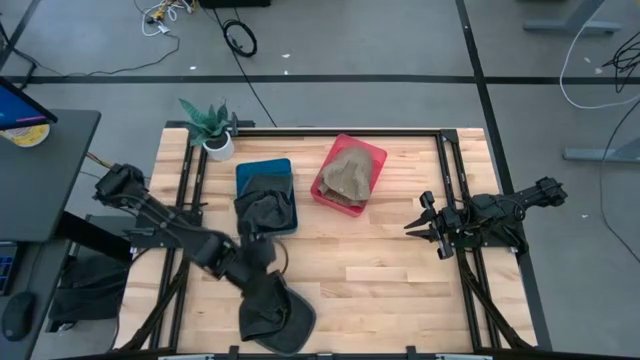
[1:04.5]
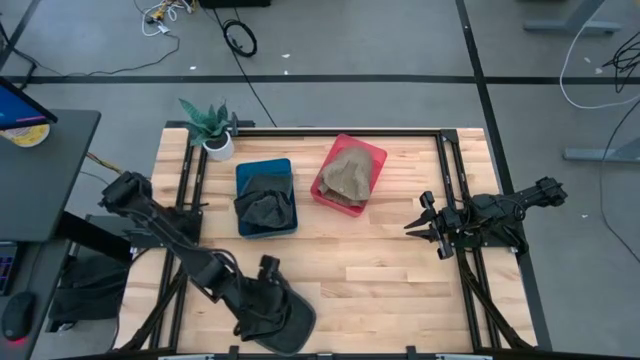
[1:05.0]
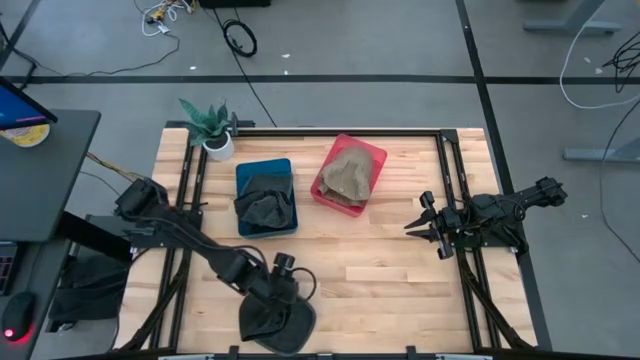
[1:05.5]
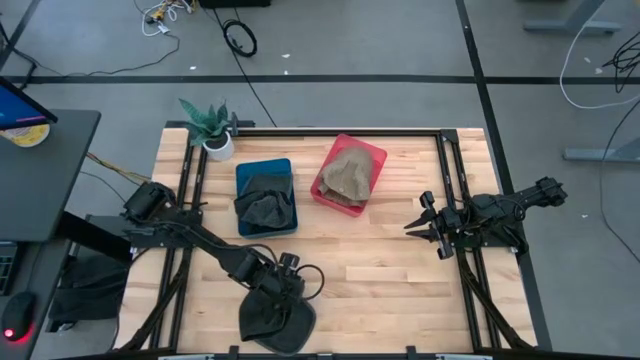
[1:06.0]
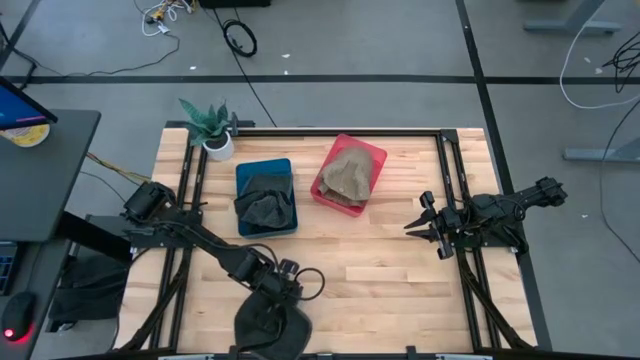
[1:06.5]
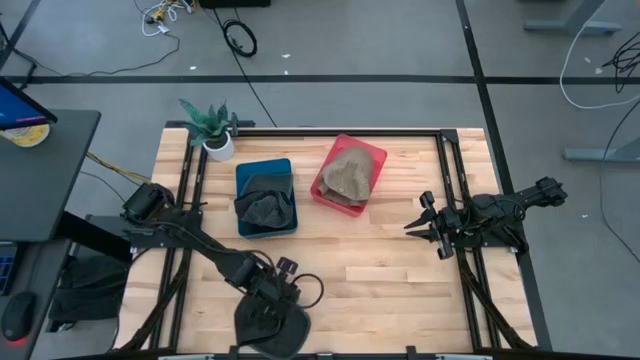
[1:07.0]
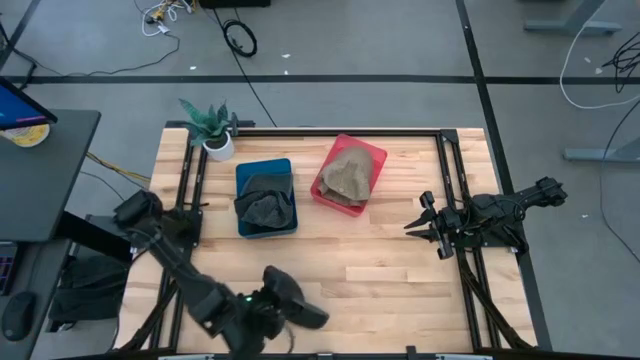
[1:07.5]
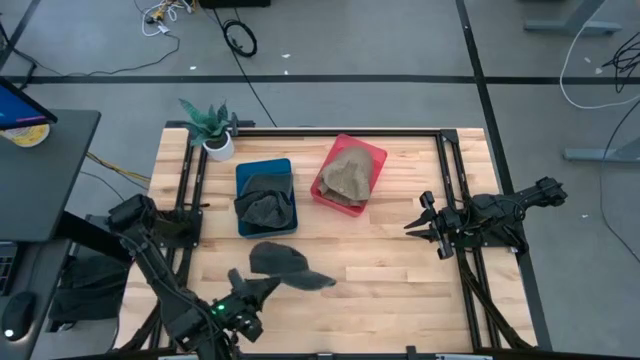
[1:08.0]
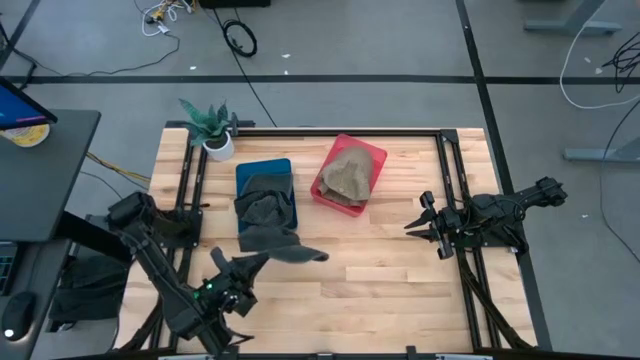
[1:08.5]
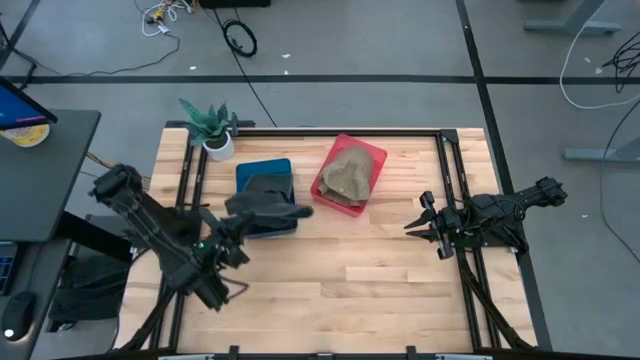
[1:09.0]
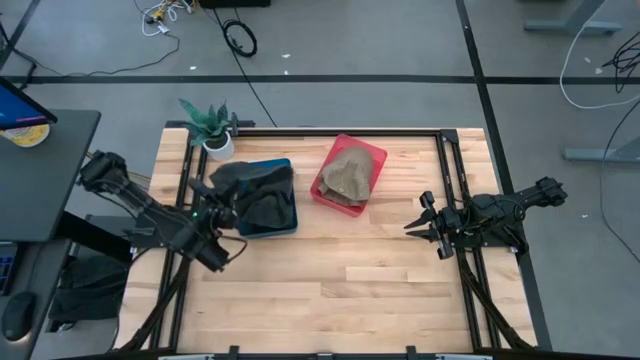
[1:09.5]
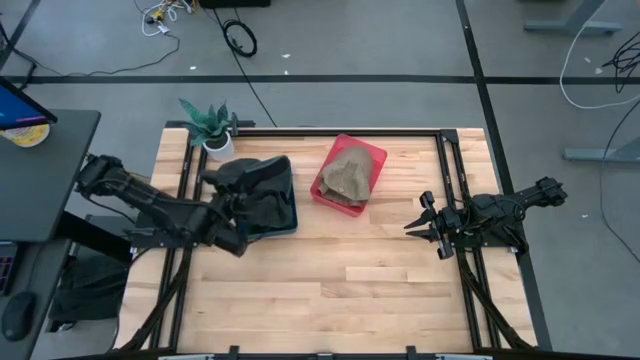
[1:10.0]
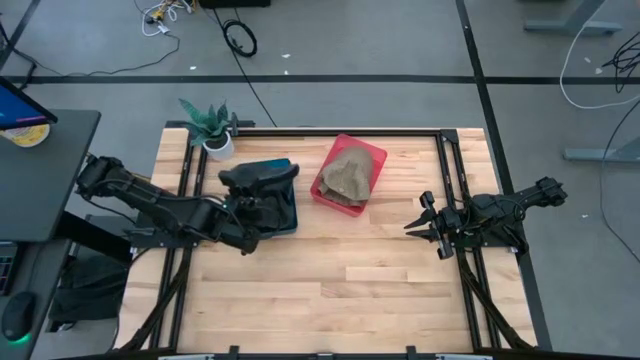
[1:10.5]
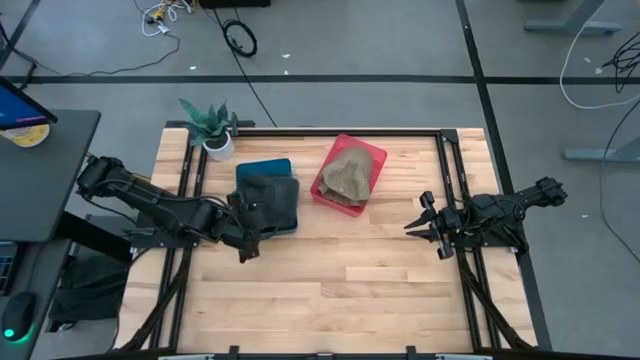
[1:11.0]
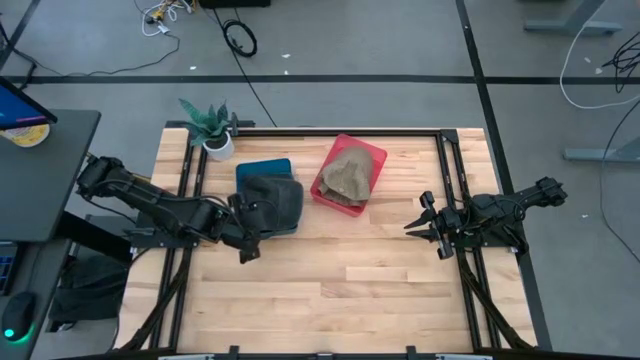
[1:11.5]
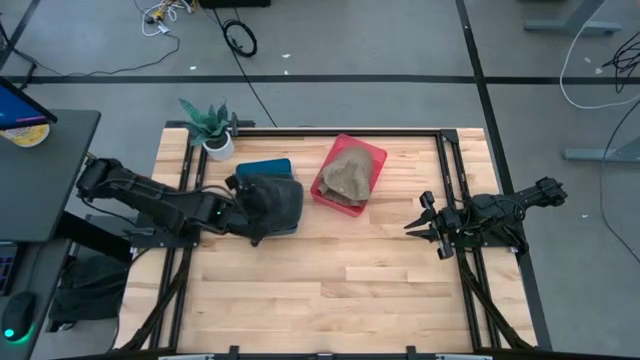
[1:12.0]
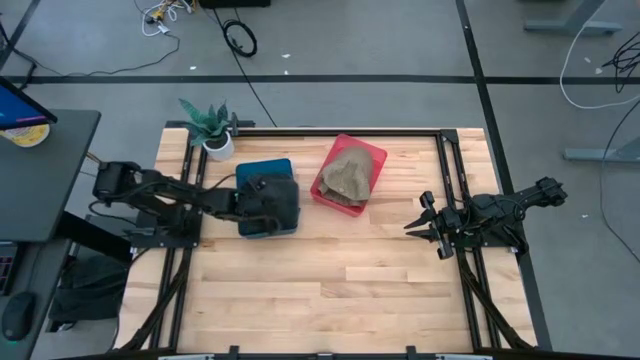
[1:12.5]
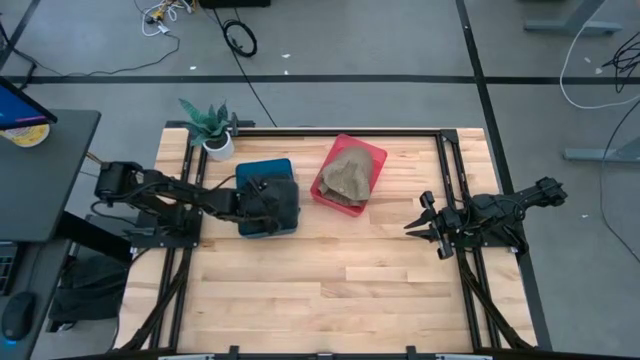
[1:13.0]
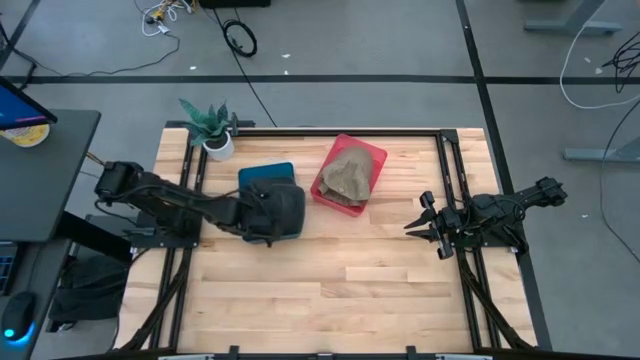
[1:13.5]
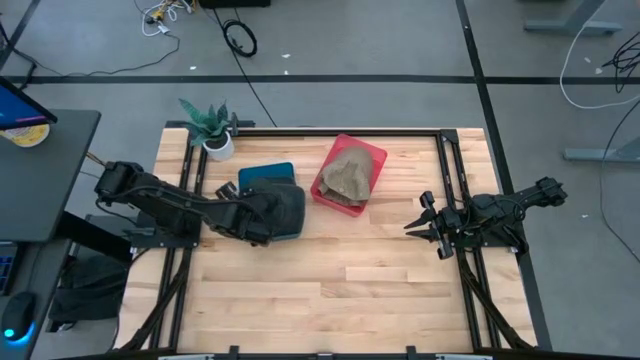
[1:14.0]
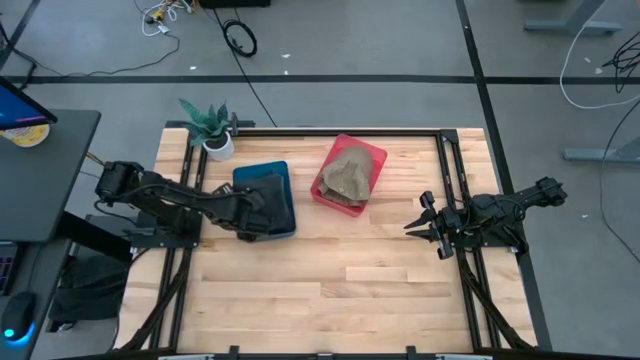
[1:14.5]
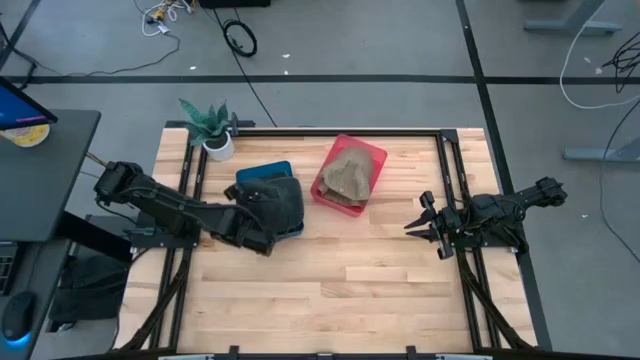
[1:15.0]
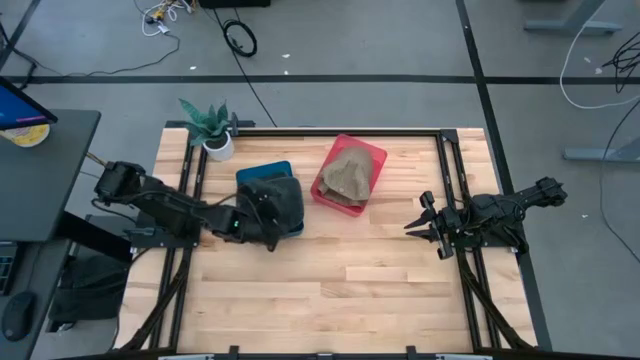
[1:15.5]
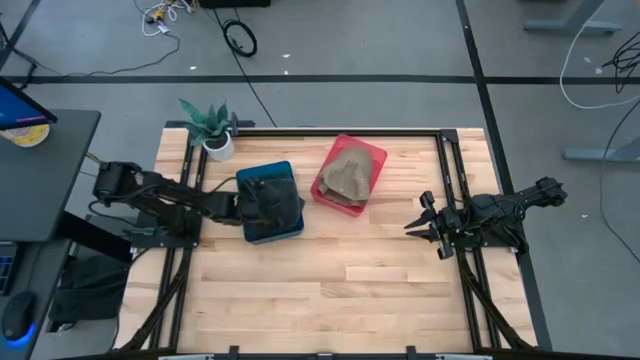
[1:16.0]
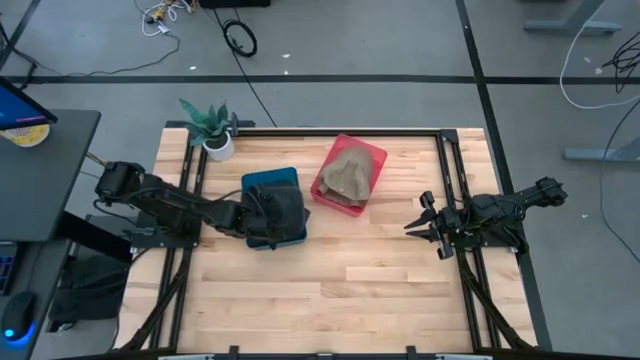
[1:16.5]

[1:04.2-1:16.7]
Task: Pick & Place hat
Put the black cap into the blue bin
